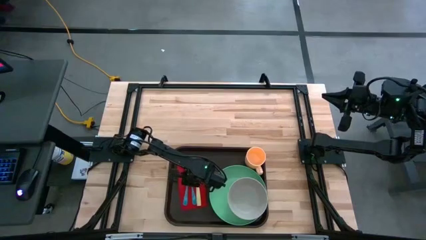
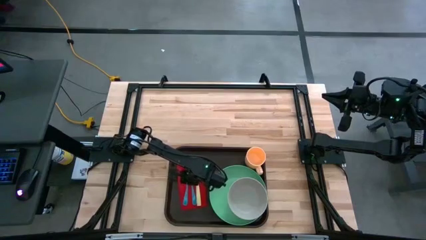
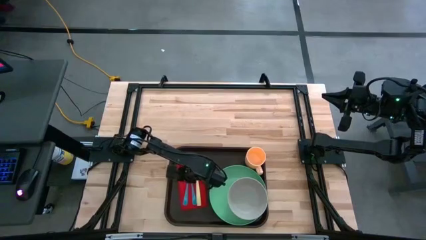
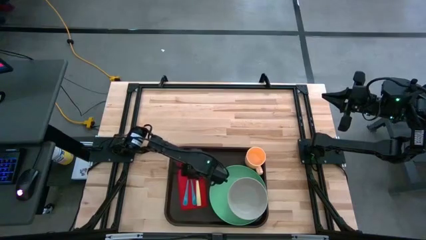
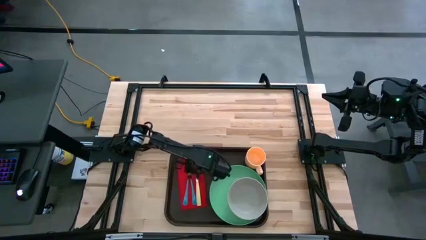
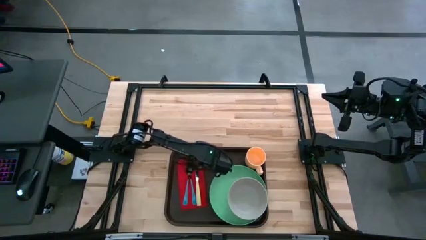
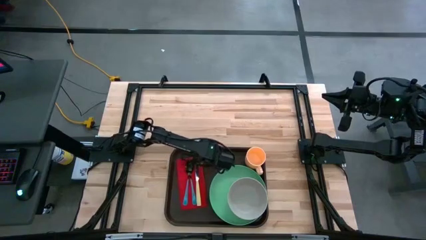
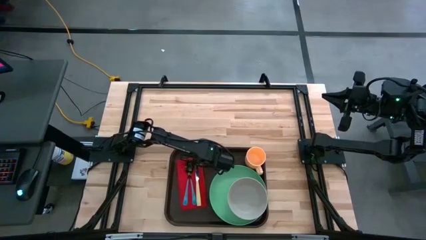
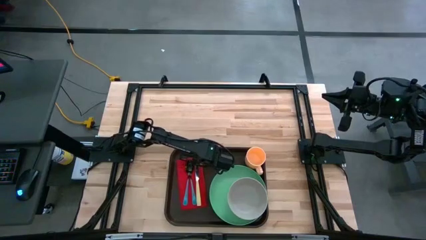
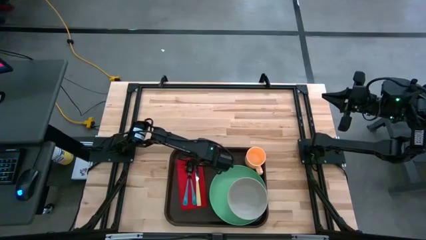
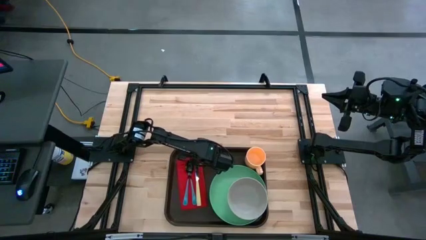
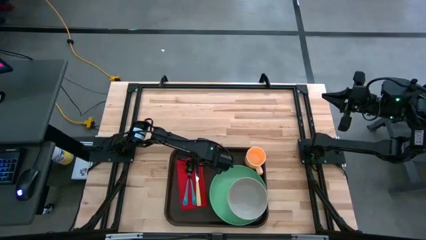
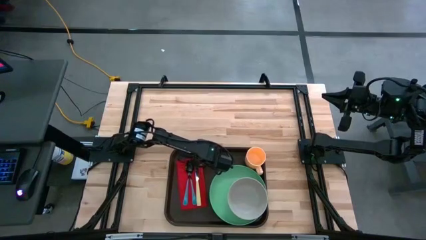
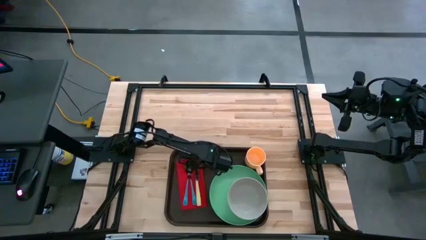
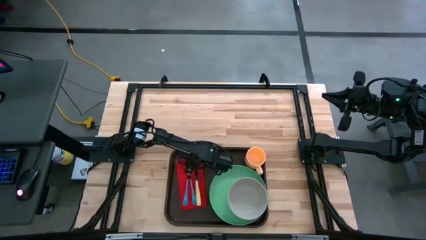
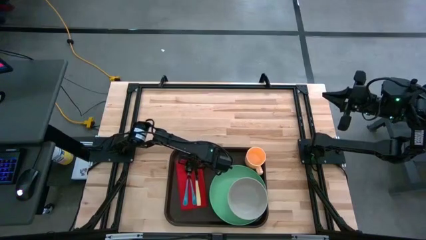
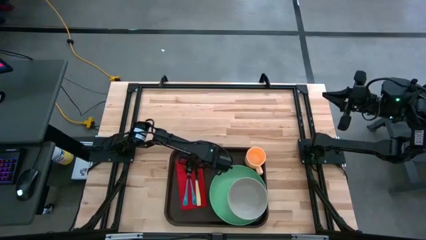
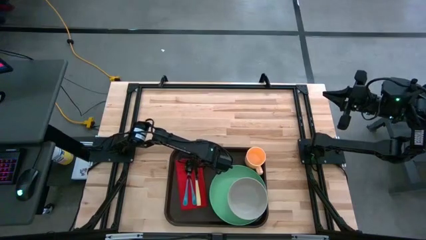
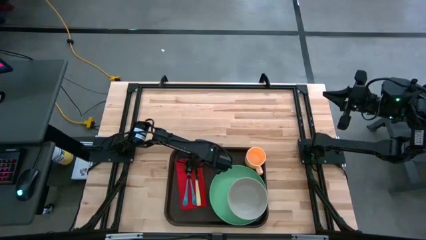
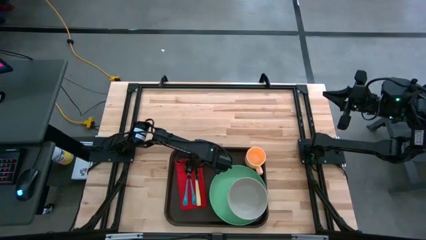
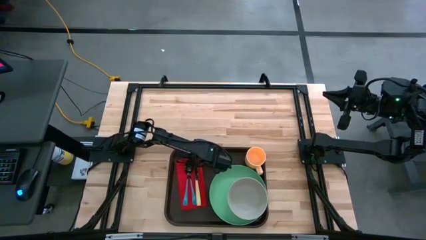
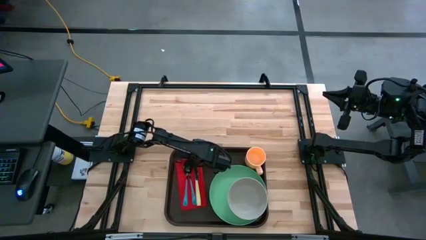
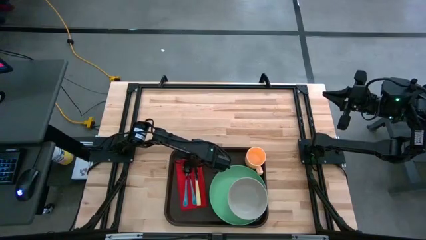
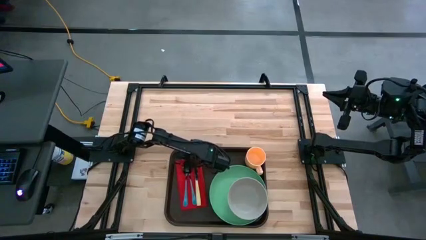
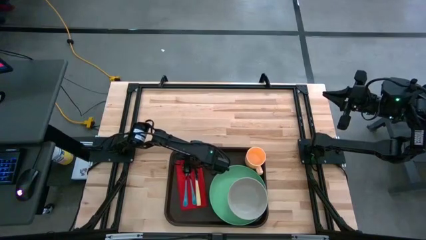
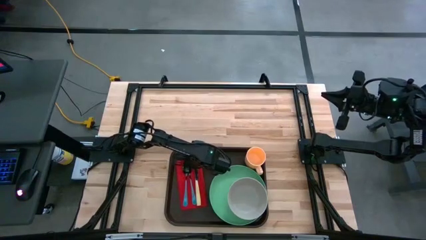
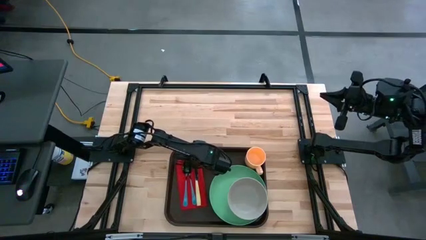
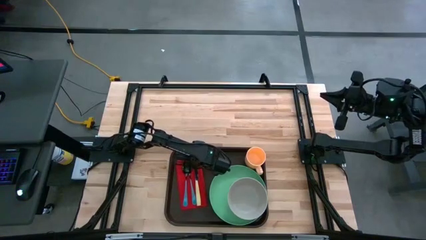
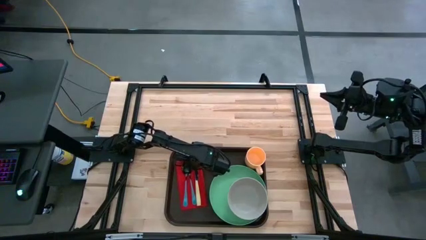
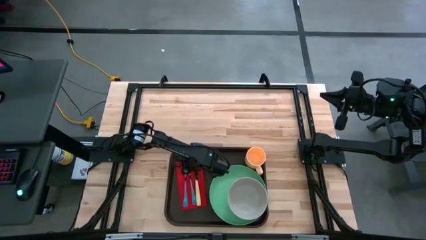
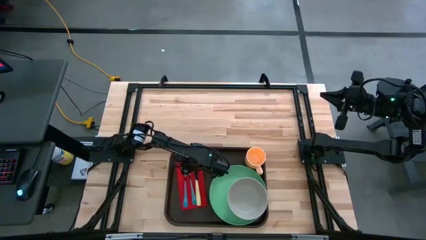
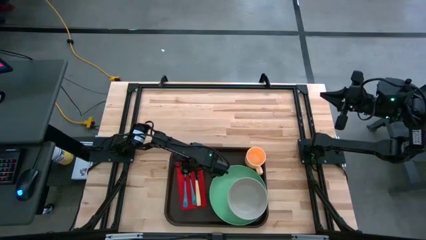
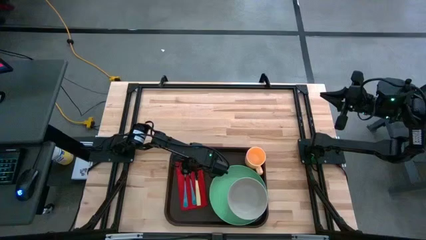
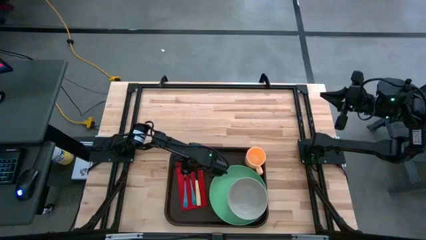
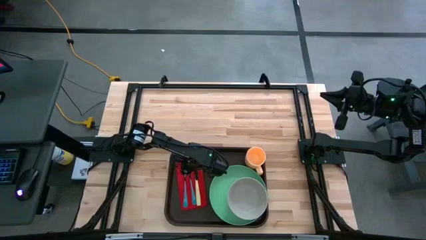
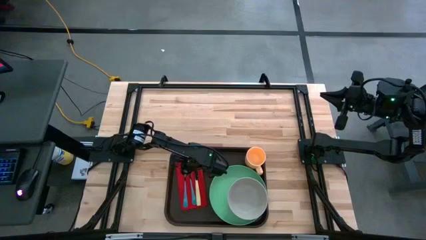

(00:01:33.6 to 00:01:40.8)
Task: Set up tray
Adjust the silverware

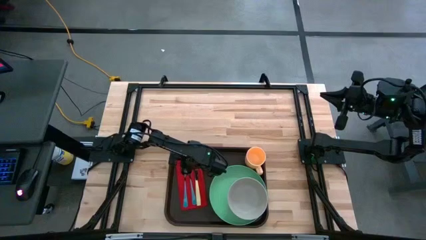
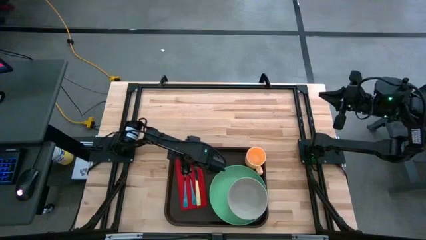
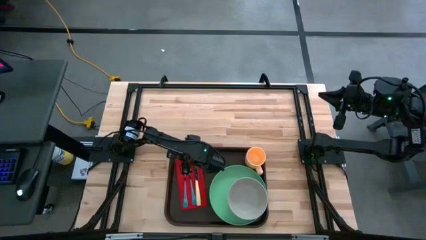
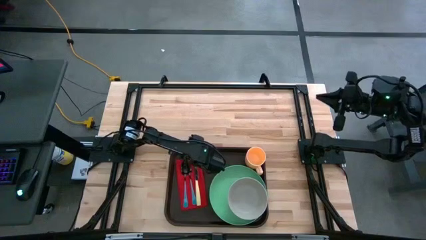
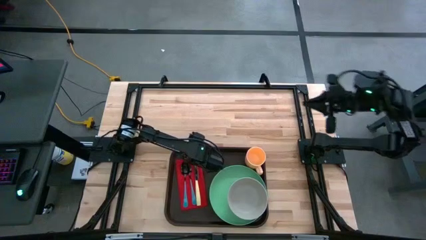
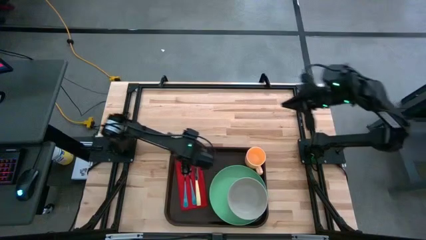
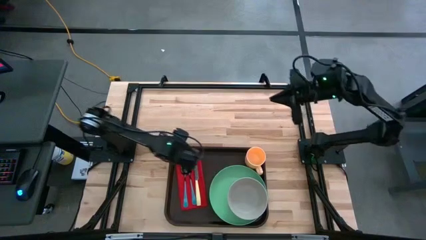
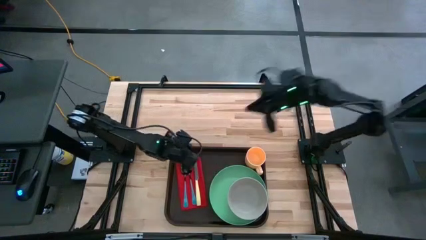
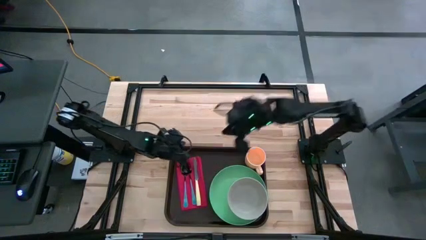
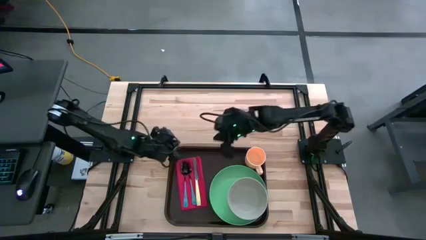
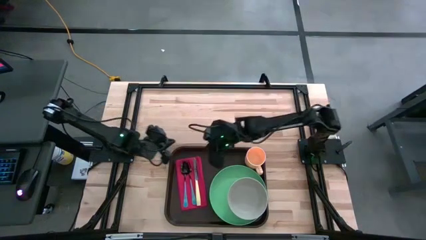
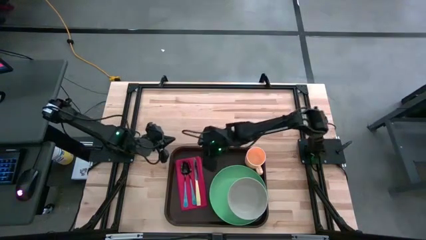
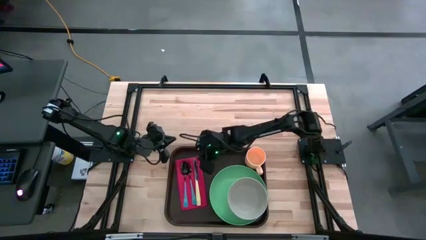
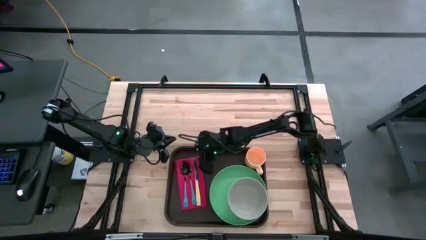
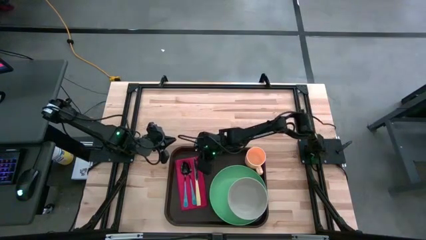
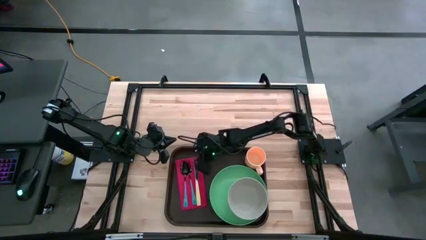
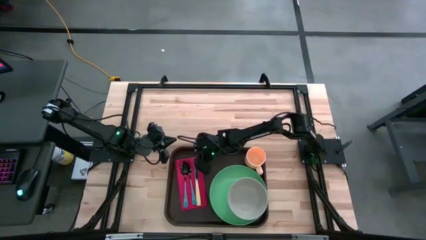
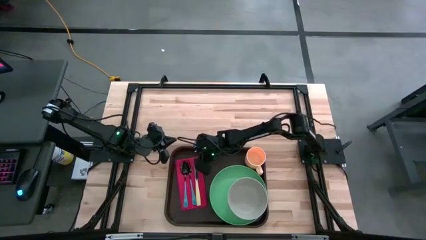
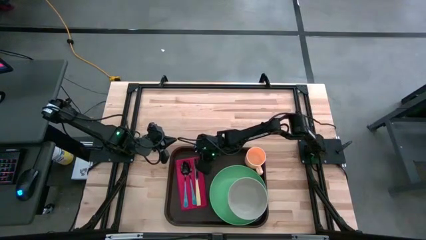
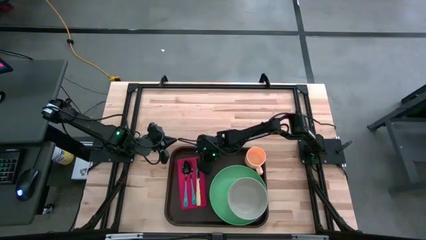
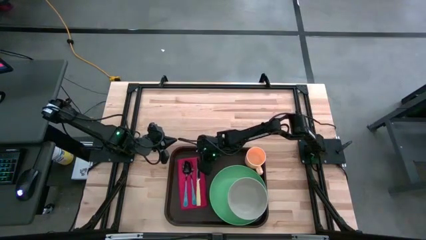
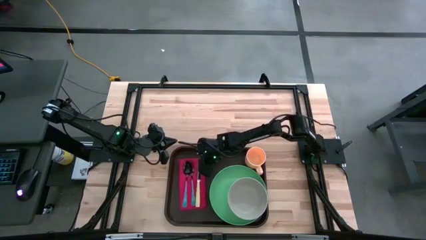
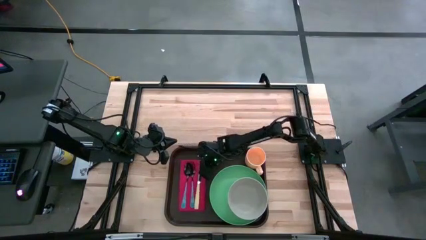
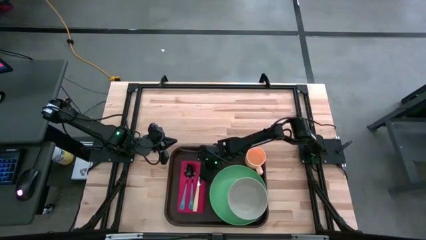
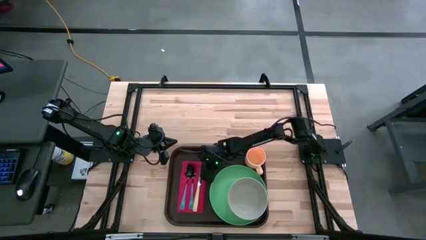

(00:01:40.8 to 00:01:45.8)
Adjust the red napkin

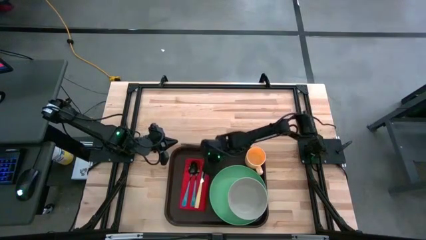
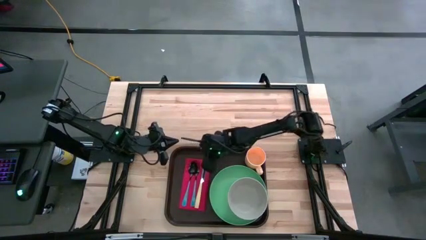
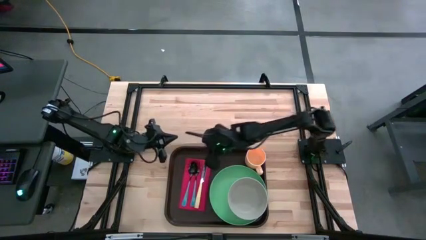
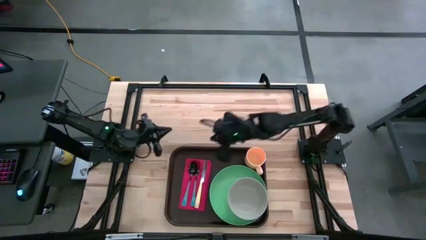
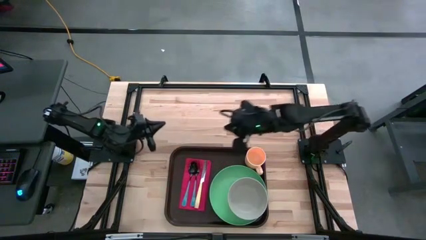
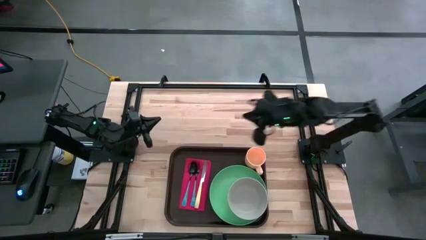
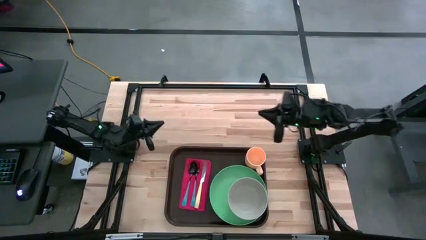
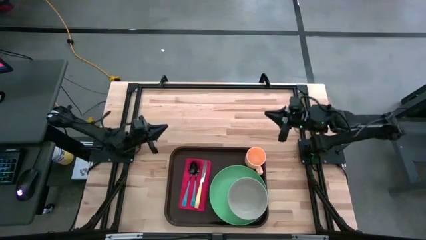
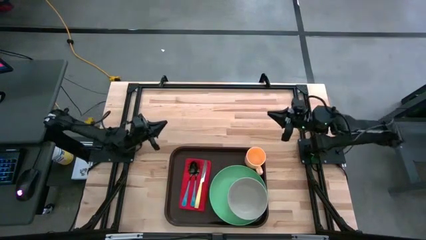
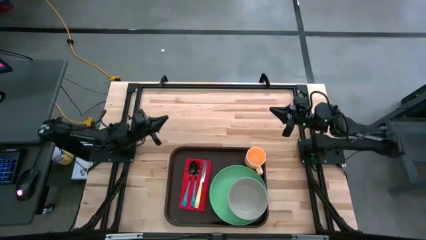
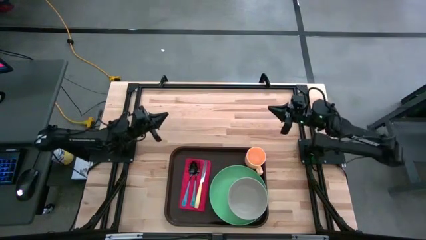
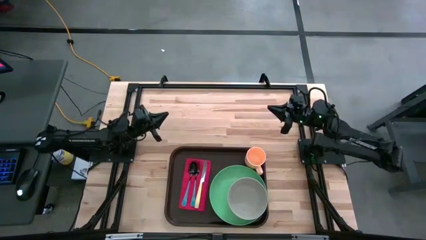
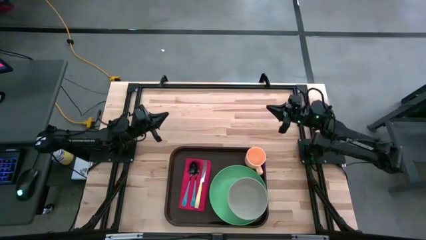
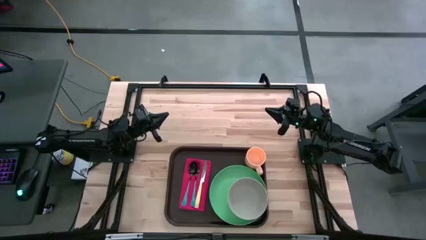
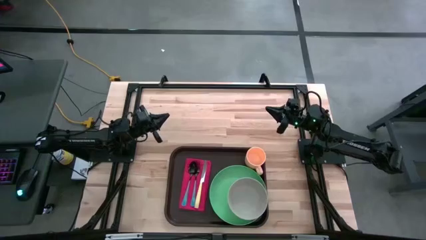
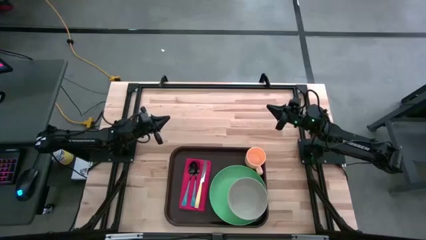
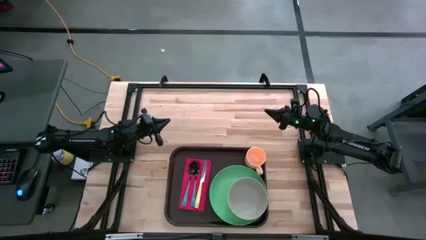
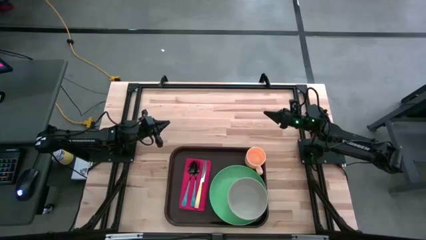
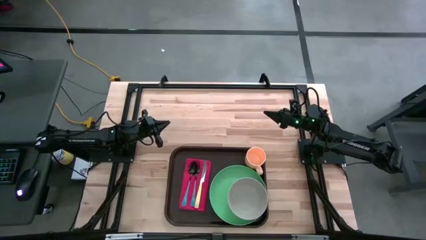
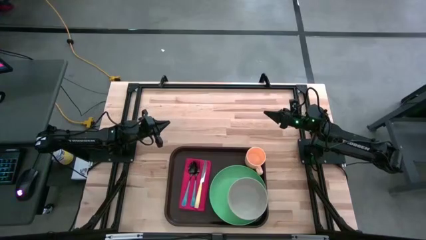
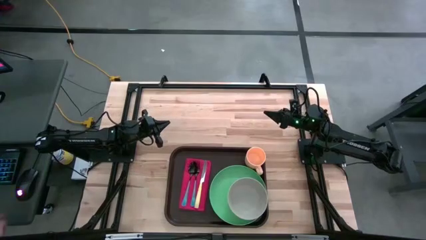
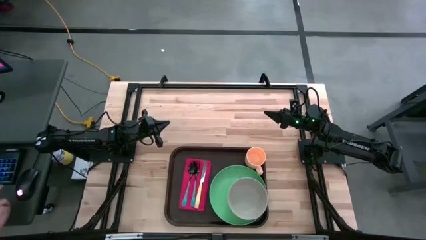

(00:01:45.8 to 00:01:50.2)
Return to Home Position
